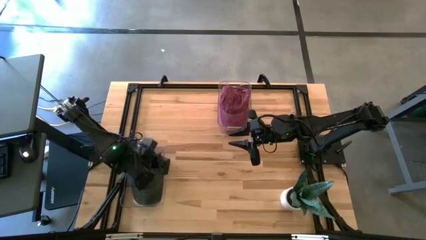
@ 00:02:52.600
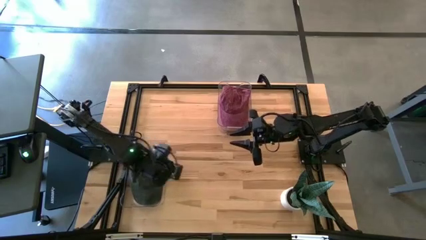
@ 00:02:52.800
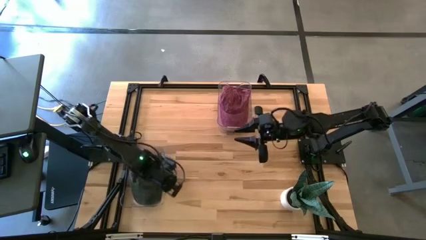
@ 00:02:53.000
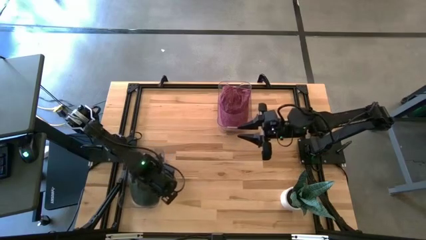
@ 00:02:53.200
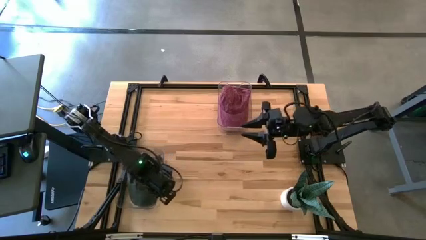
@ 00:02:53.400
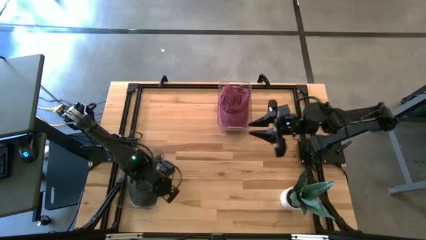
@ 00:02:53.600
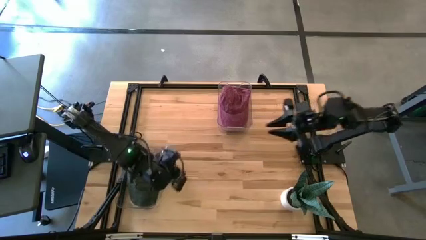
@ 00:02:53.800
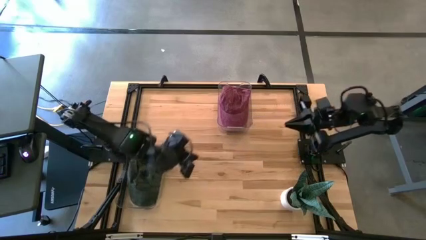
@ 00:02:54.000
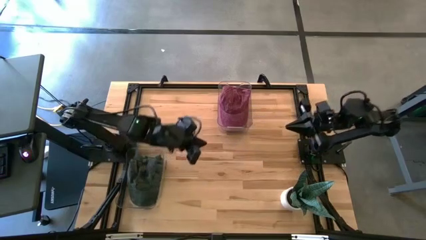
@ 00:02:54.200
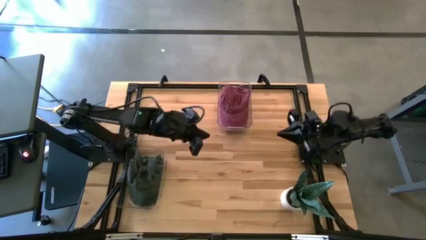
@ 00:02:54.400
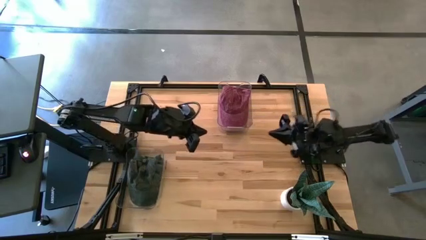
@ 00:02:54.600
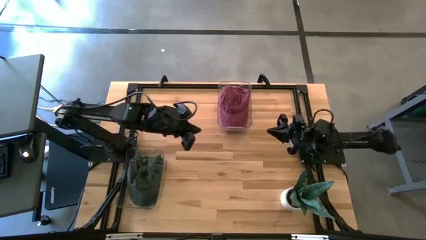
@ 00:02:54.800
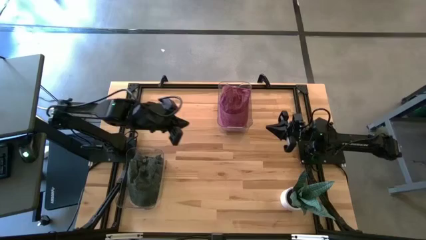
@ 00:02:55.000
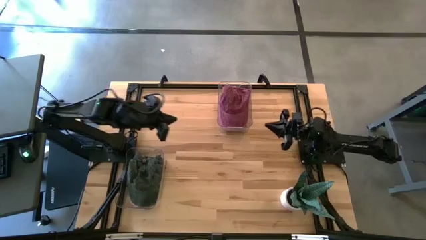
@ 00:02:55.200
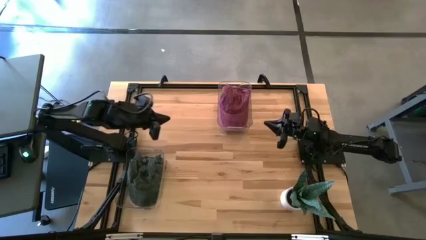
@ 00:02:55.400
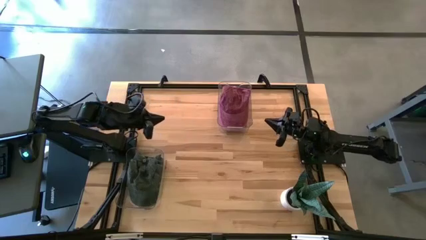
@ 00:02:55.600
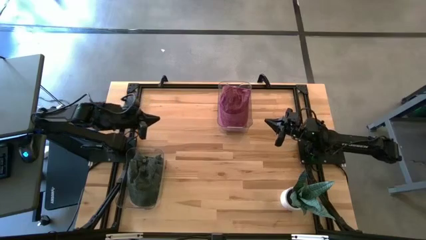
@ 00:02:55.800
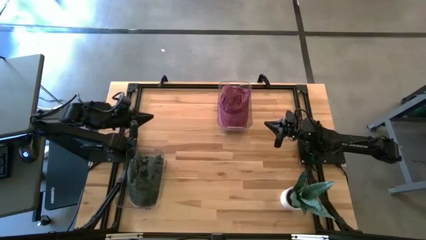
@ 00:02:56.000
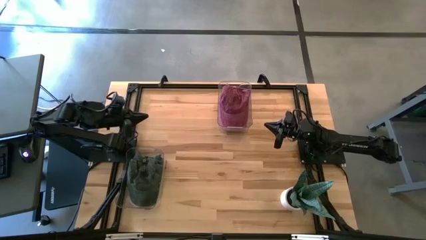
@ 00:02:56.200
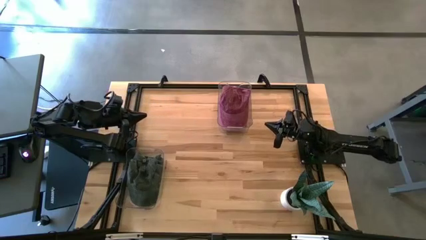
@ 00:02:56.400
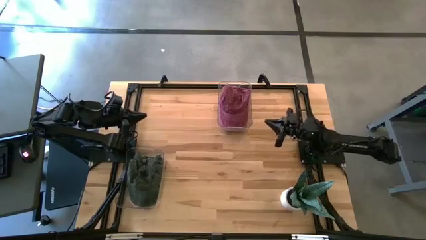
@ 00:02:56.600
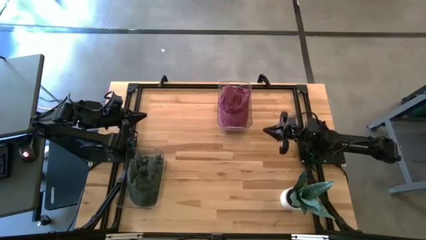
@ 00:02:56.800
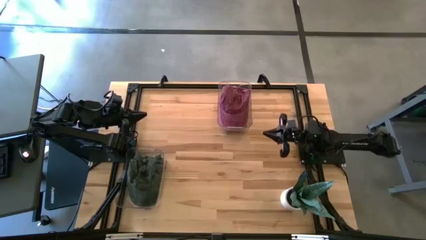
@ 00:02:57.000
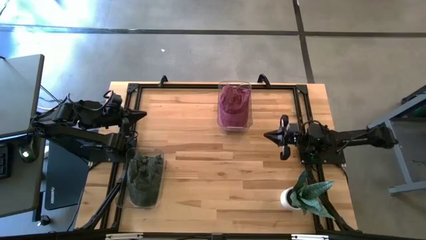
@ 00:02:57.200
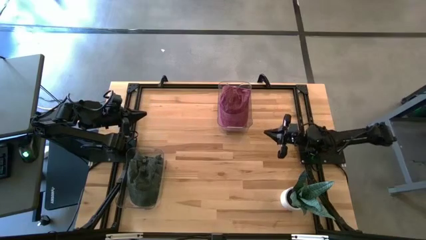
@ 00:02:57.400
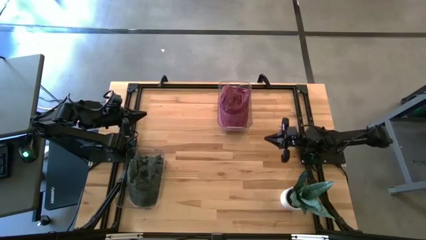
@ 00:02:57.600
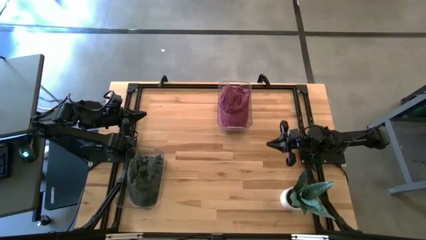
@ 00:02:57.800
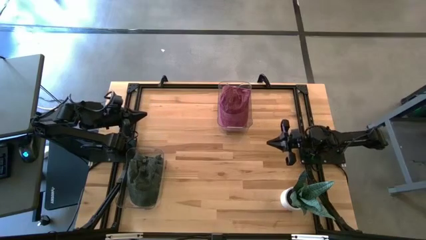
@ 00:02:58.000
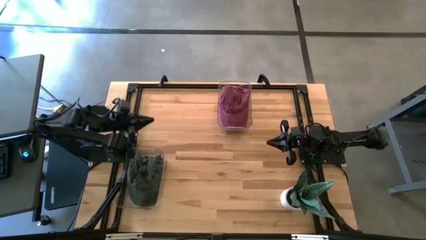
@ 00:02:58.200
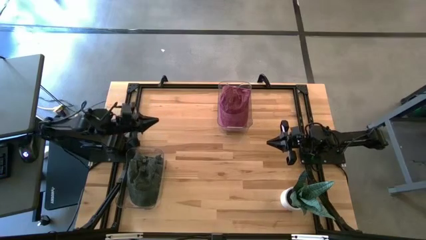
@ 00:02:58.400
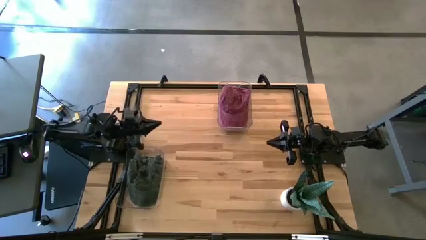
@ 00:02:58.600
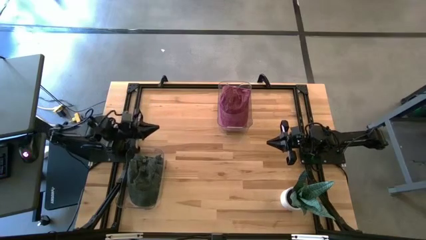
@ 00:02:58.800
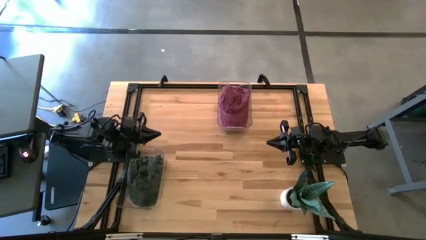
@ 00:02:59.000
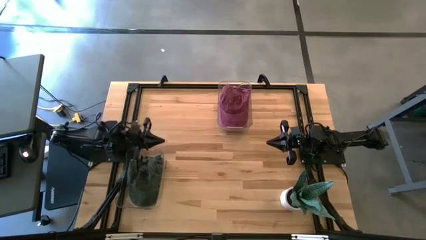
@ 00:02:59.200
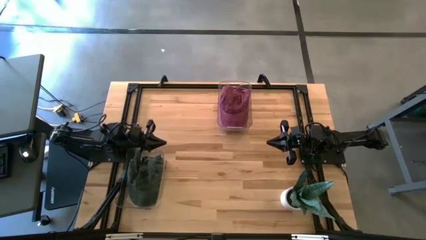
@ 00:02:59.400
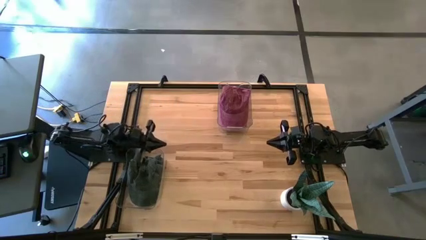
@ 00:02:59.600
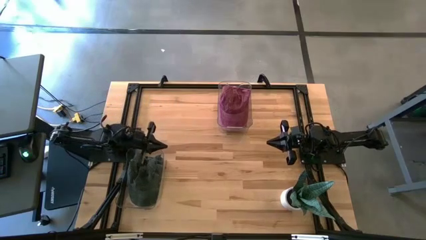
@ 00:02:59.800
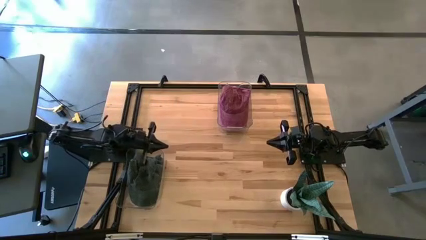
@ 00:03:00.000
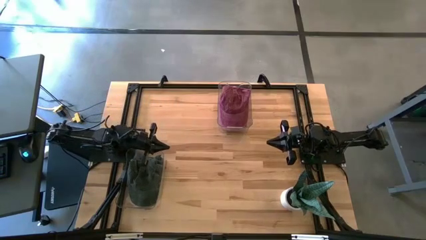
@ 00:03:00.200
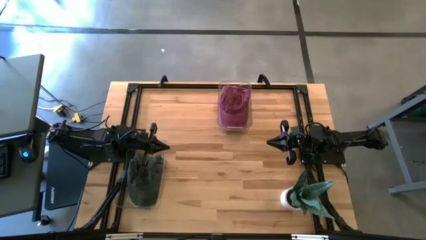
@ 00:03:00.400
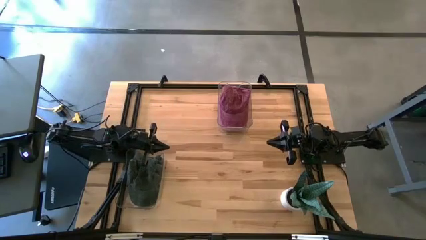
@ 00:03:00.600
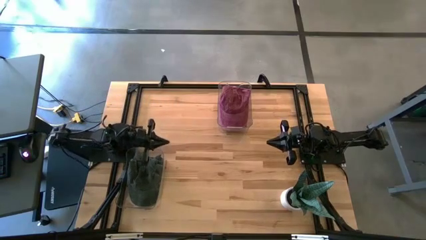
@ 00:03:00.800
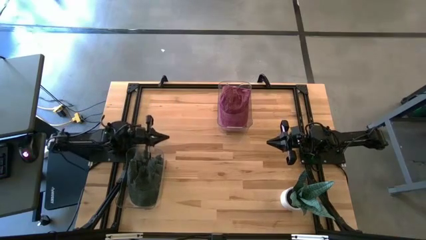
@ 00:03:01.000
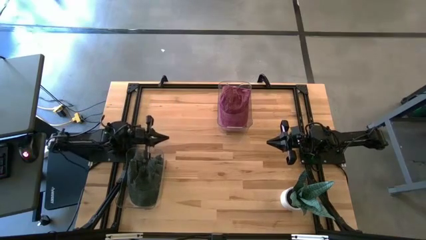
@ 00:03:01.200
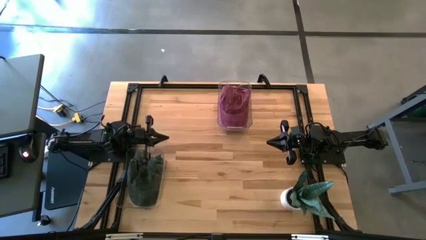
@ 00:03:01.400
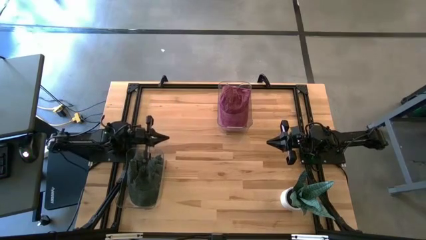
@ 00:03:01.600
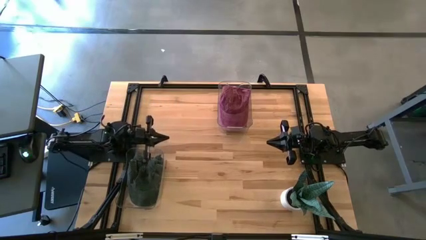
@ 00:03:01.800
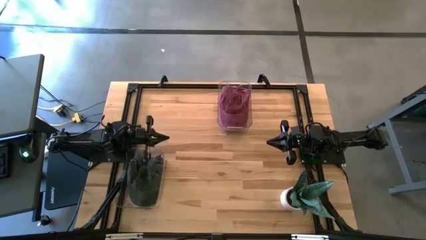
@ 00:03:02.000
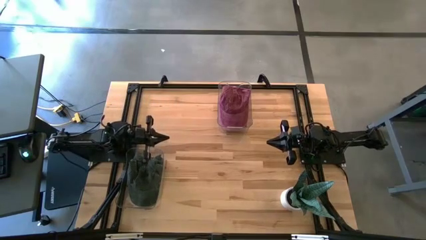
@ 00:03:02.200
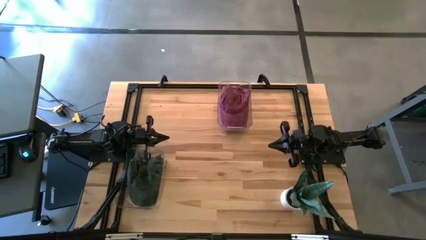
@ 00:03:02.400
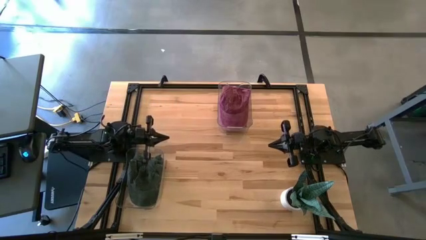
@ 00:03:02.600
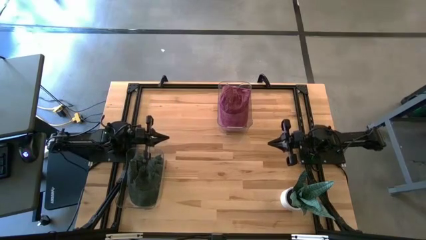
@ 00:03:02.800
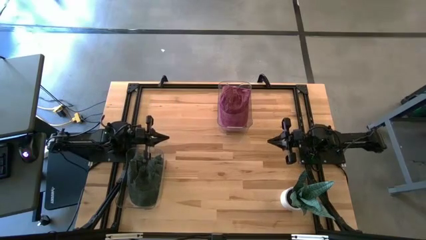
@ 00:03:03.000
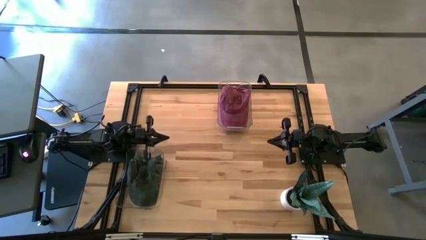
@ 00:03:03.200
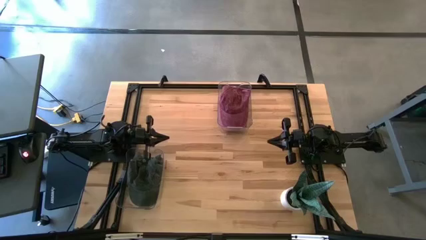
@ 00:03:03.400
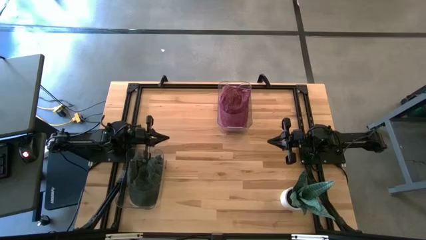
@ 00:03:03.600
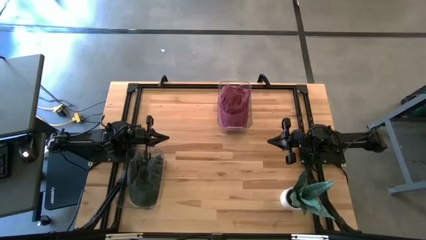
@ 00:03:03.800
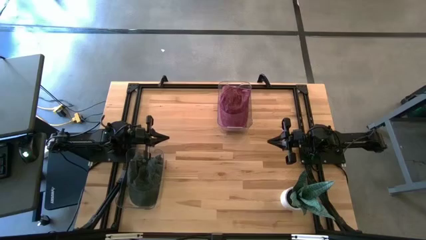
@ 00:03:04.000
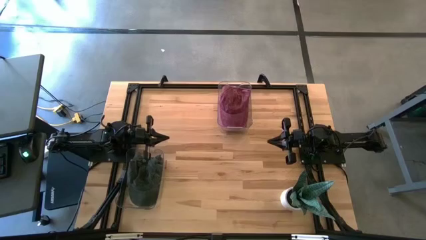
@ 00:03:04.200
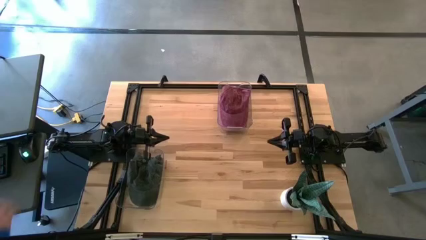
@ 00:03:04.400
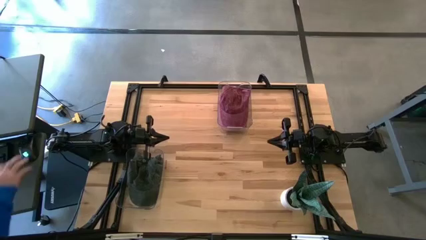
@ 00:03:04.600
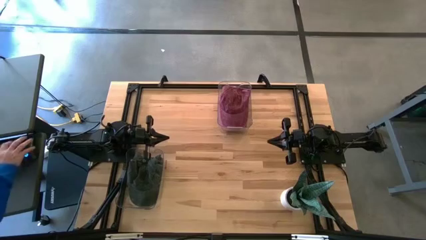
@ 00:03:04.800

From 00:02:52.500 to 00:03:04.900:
Task: Pick & Place hat
Return to Home Position

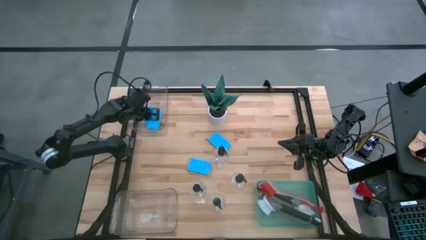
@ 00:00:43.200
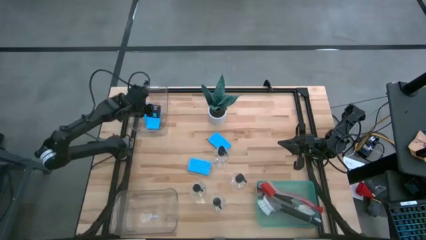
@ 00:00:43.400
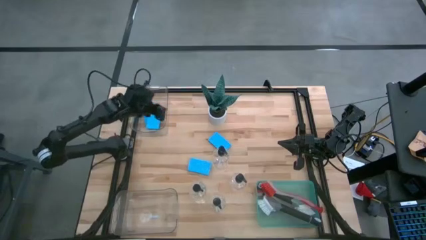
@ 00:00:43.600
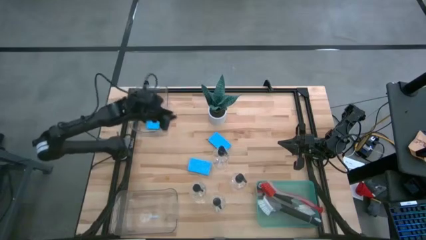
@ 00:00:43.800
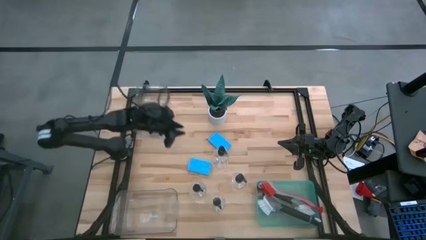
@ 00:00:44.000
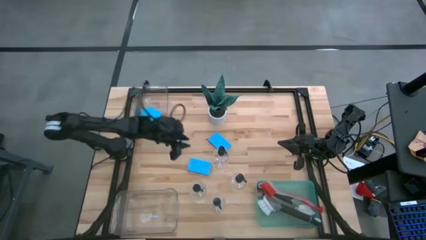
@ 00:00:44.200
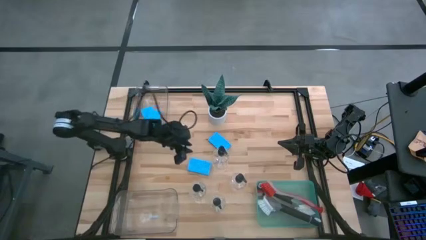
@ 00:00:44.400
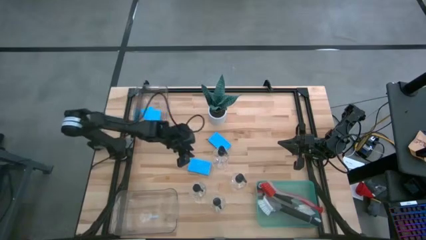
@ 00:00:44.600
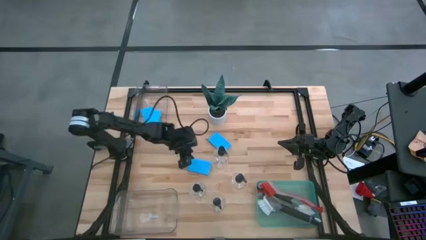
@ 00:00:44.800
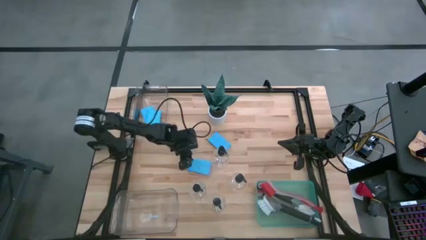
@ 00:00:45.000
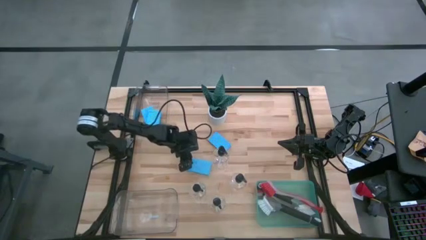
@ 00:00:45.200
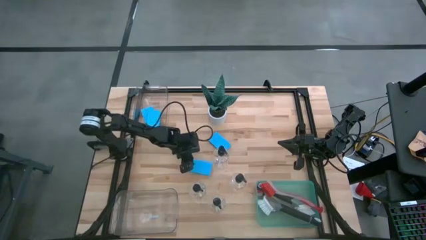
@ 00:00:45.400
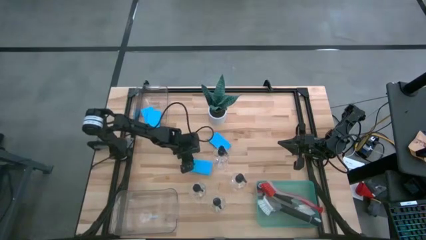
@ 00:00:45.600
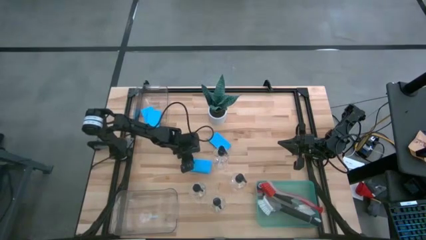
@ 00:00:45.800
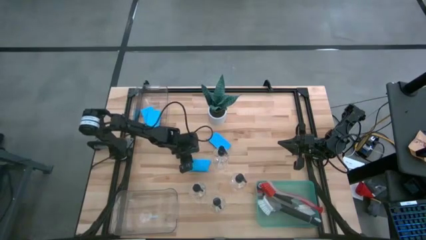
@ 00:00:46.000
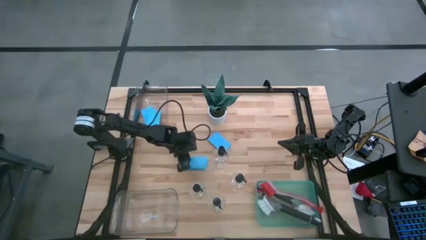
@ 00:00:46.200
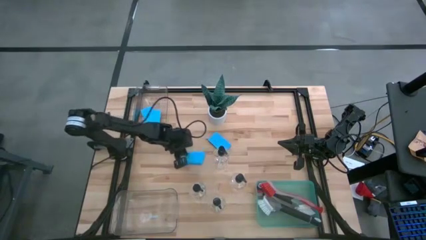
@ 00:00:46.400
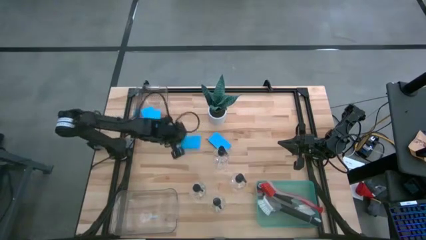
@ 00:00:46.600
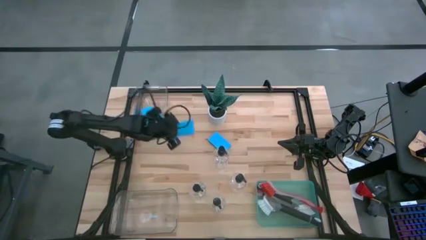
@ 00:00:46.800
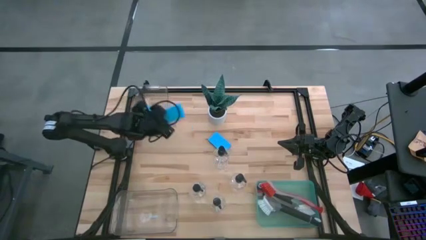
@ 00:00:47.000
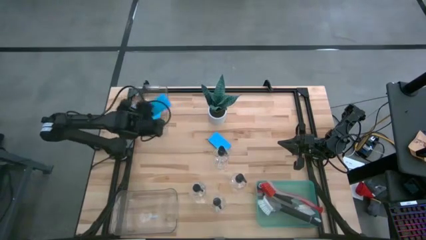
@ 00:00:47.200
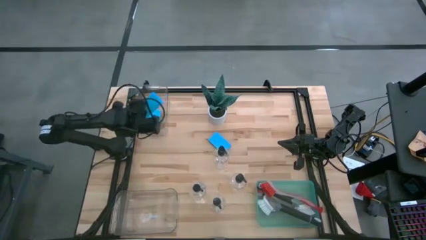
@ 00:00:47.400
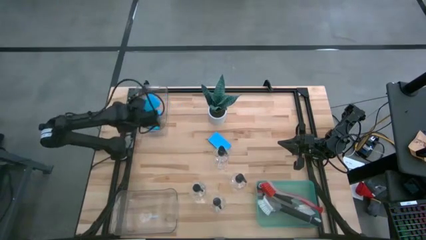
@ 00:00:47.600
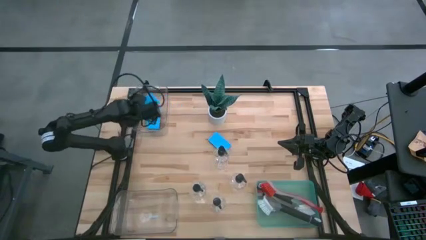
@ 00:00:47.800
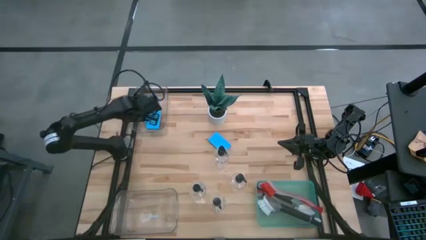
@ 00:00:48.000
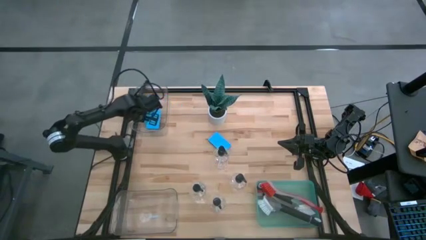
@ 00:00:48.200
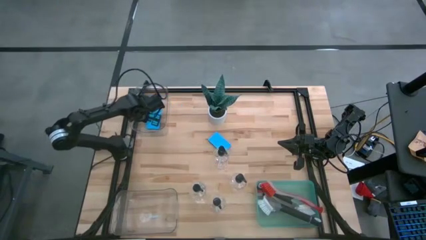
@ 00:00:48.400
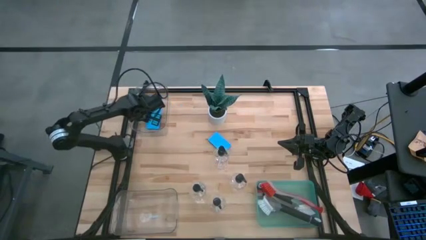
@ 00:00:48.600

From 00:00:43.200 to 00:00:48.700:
Task: Pick & Place Kitchen Sink Supplies
Put the blue sponge into the top transparent bin
